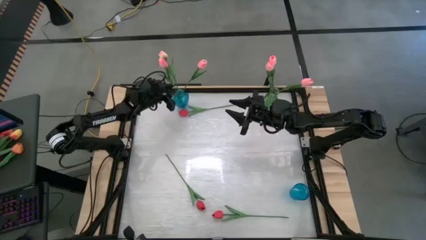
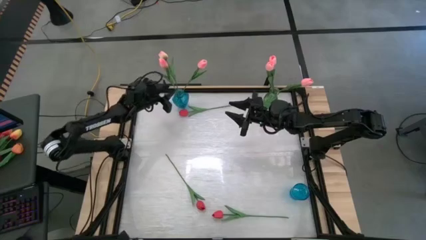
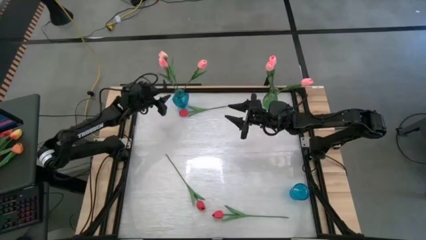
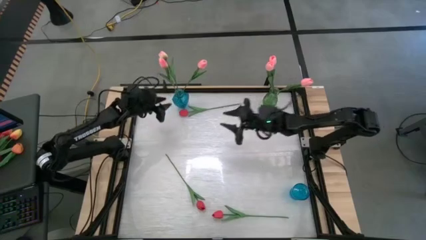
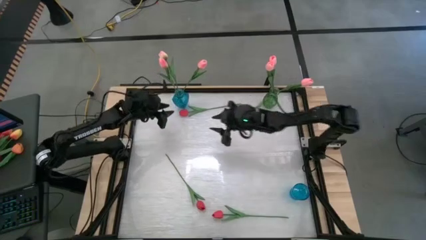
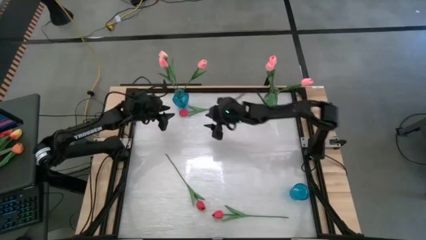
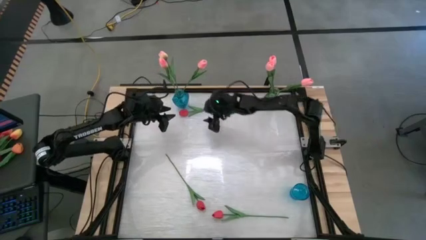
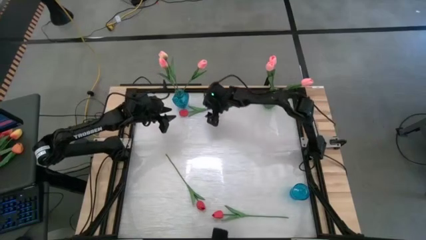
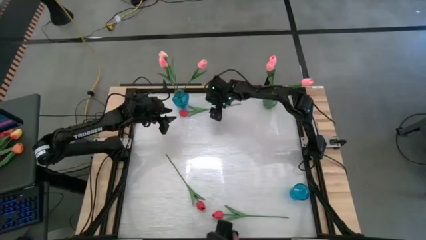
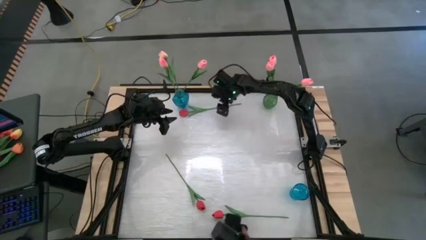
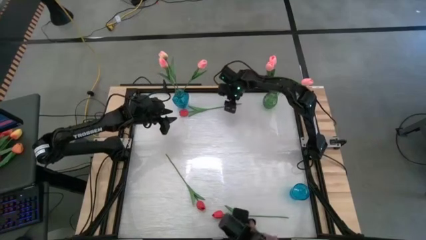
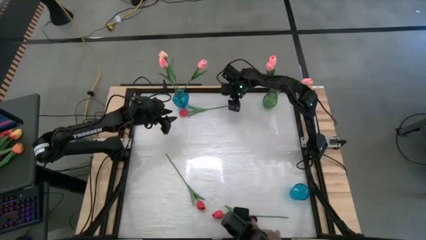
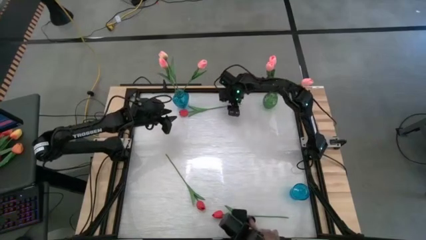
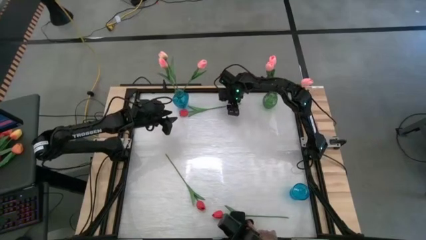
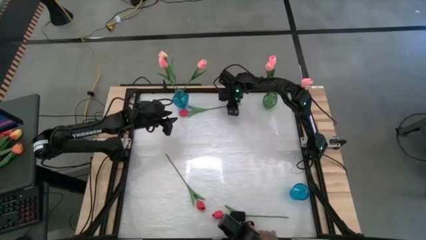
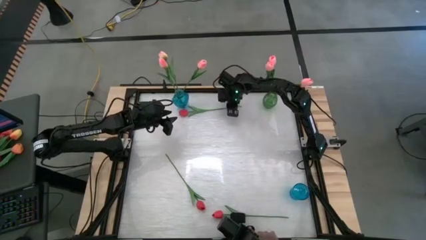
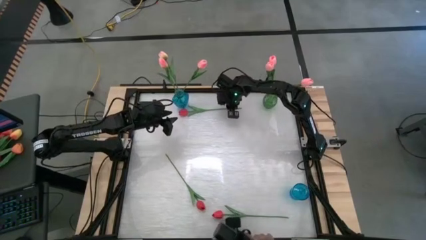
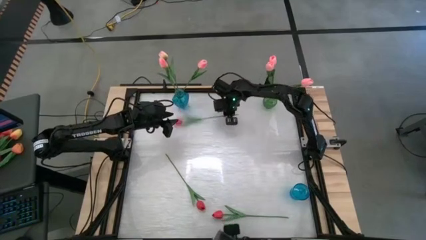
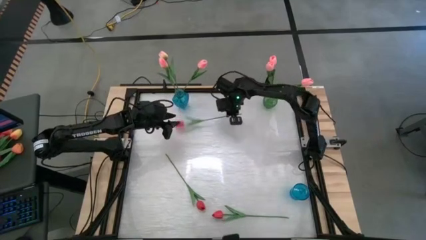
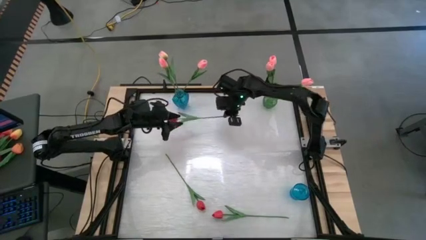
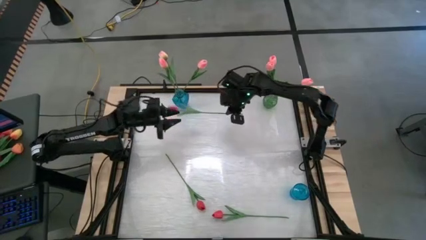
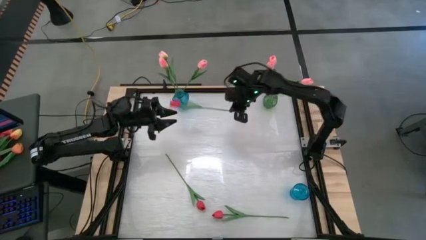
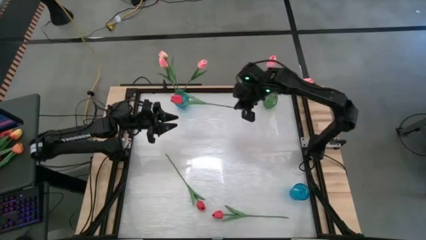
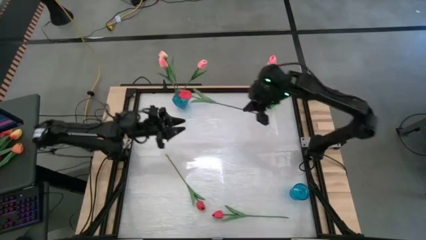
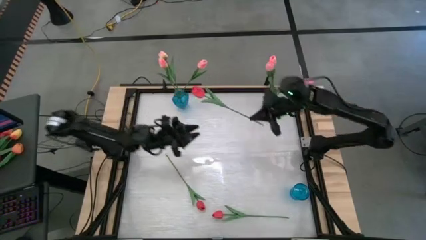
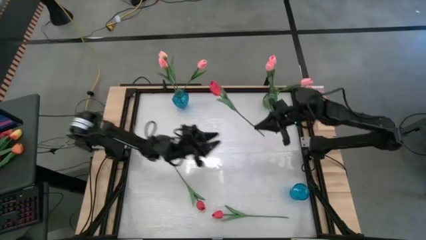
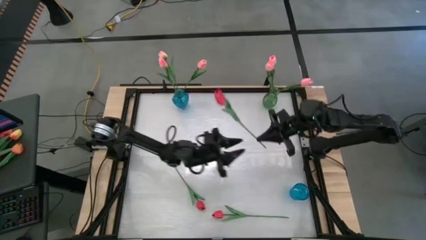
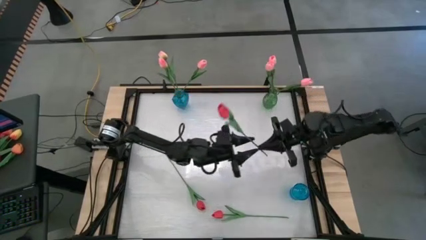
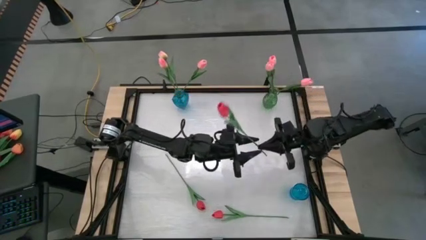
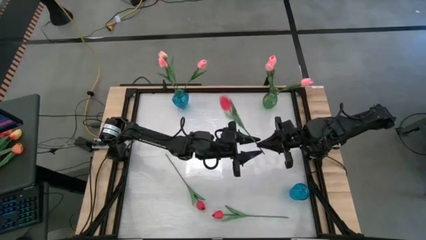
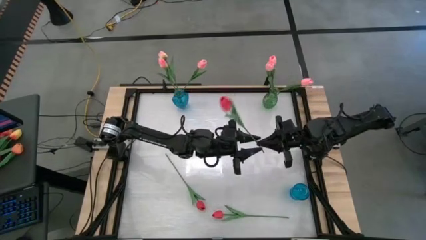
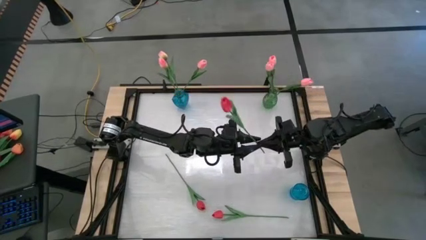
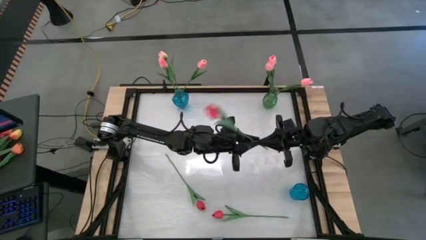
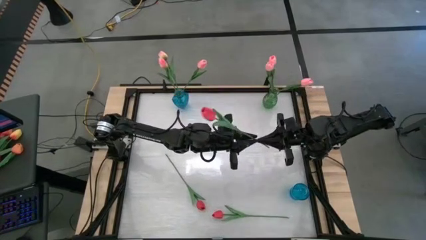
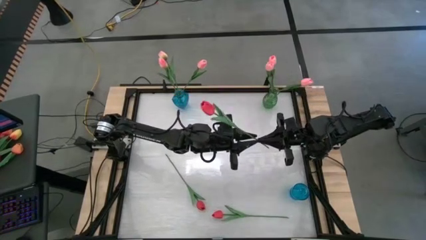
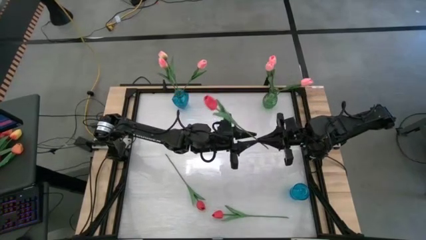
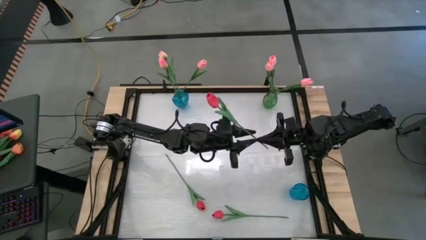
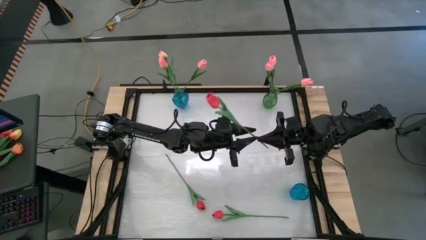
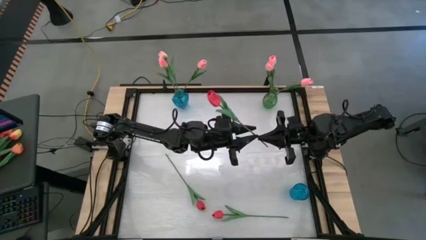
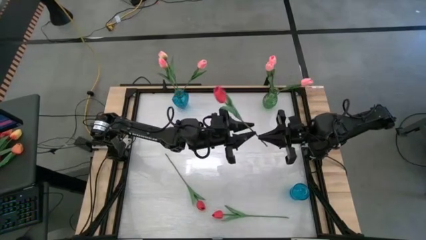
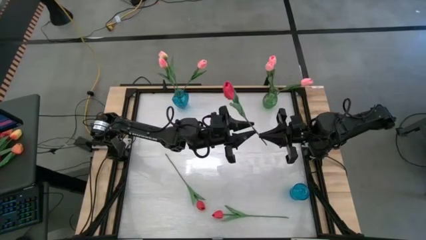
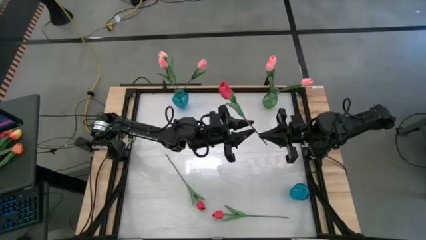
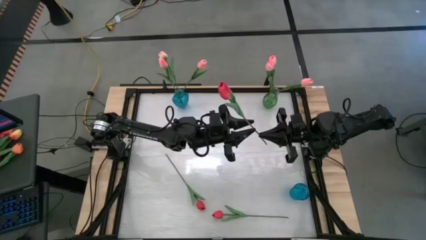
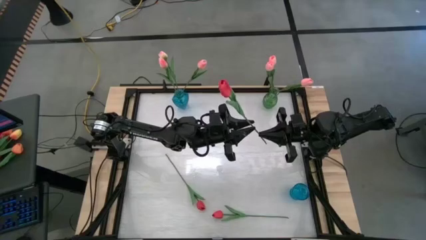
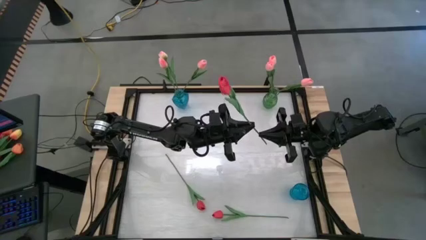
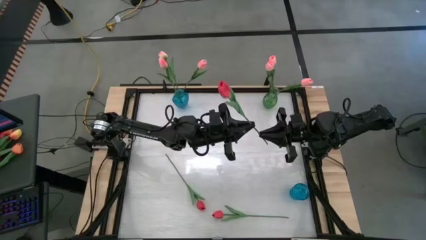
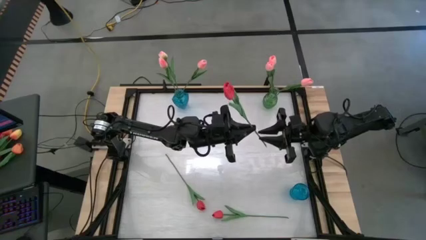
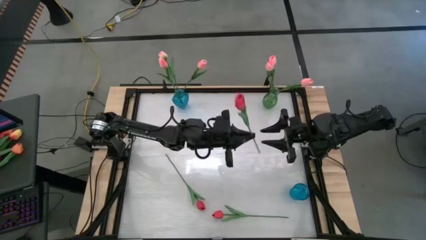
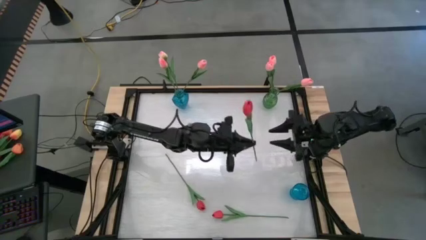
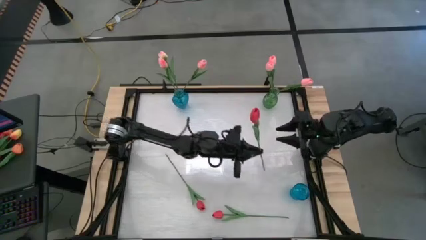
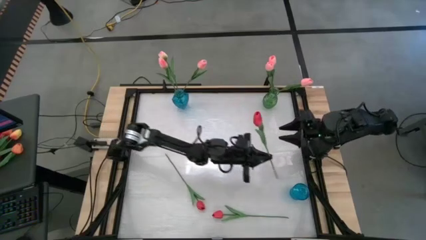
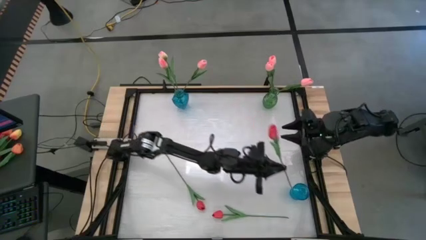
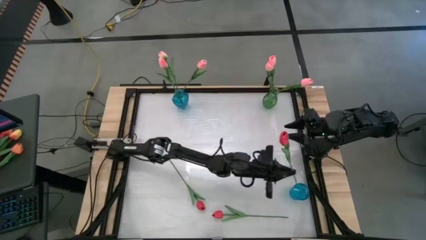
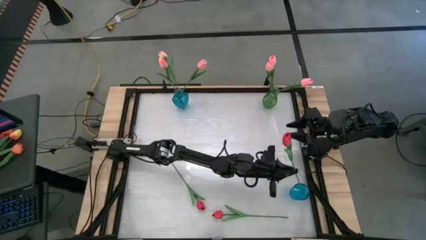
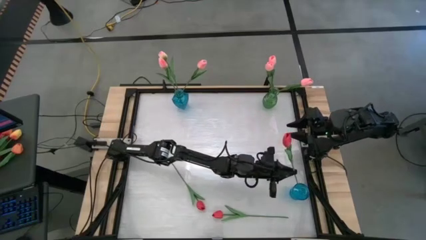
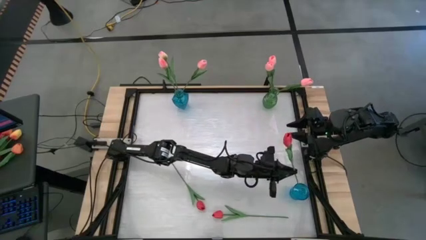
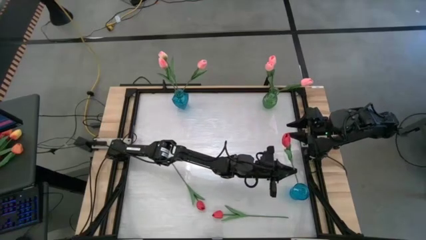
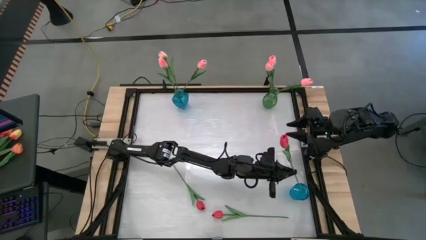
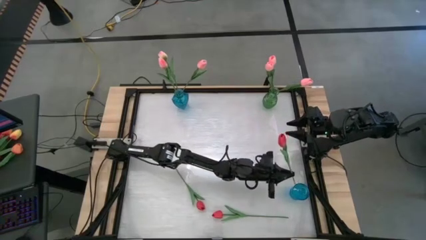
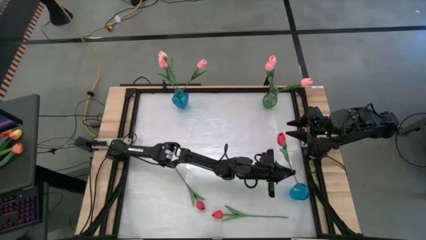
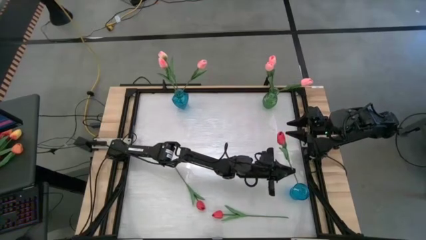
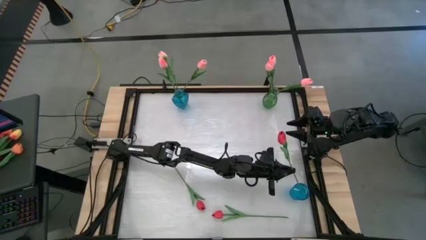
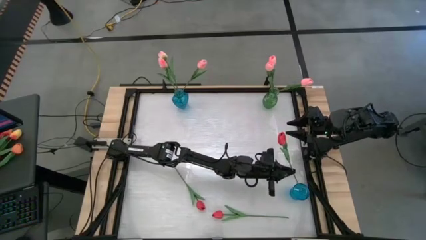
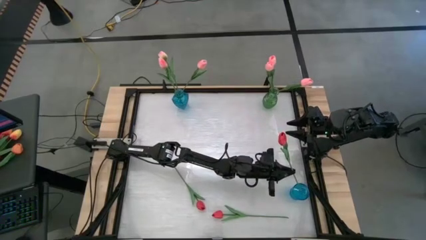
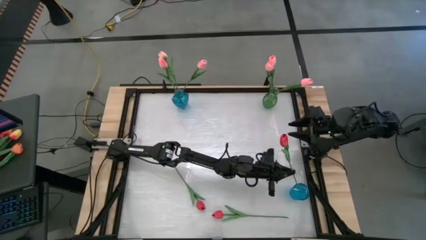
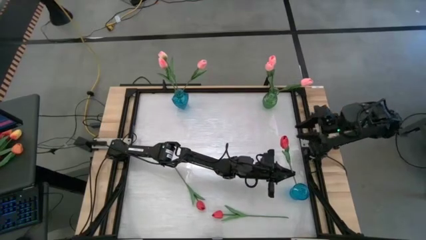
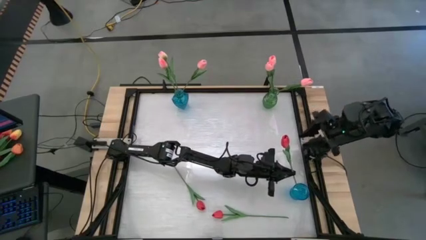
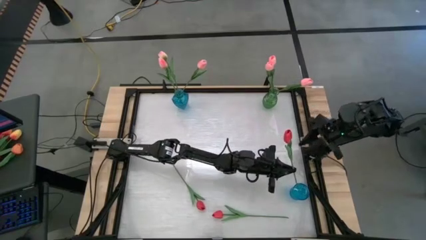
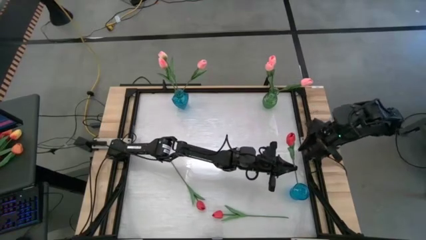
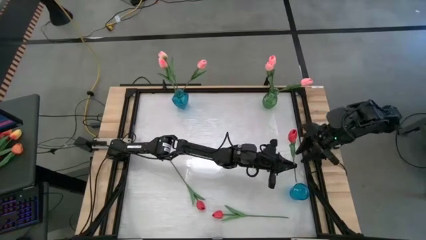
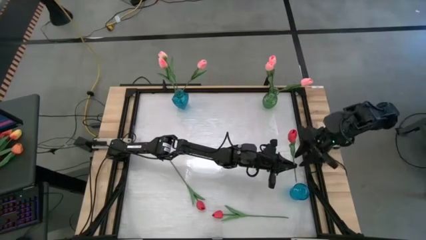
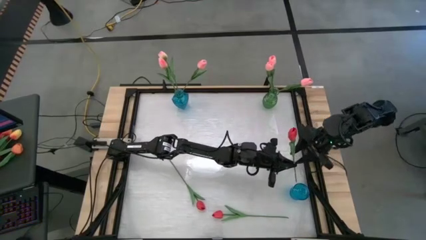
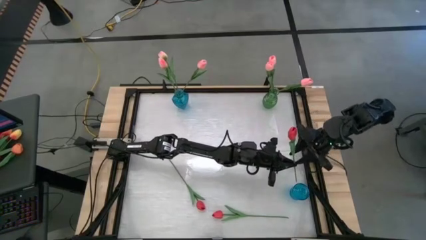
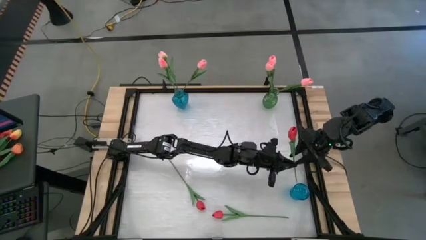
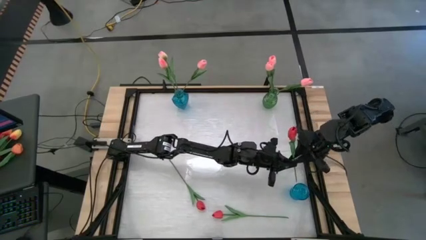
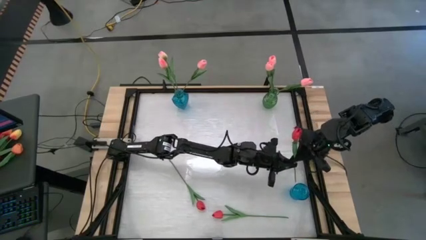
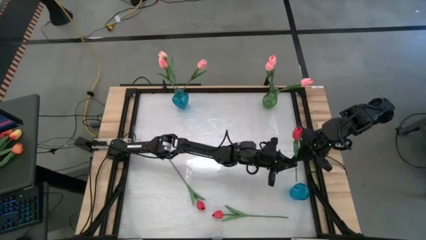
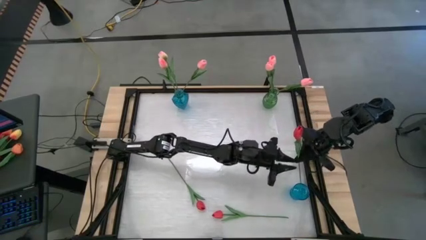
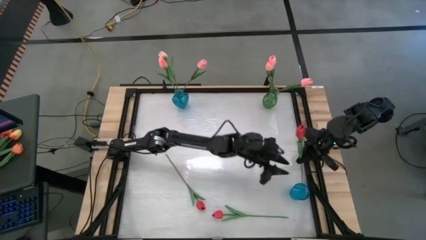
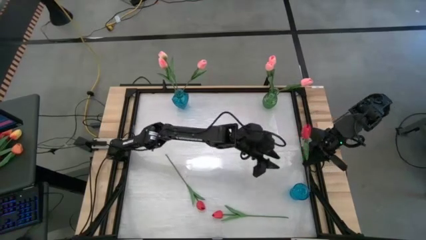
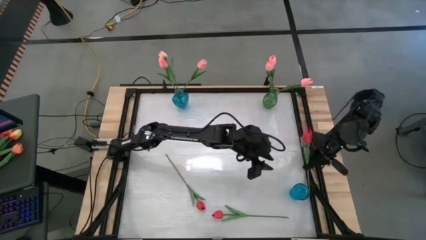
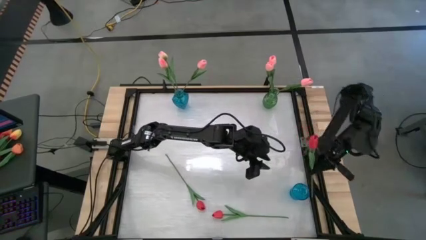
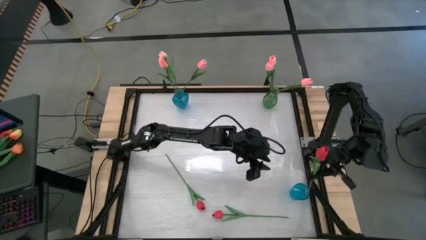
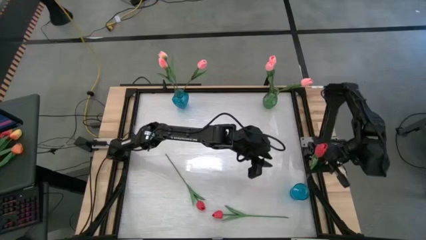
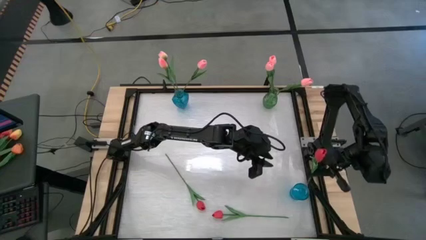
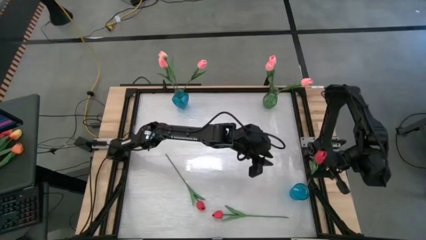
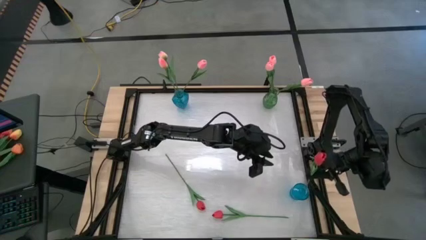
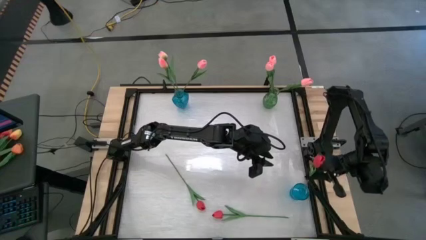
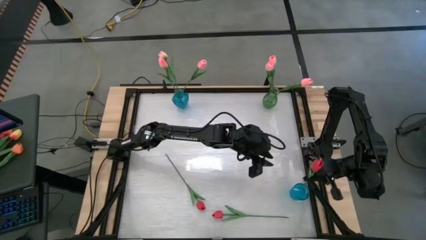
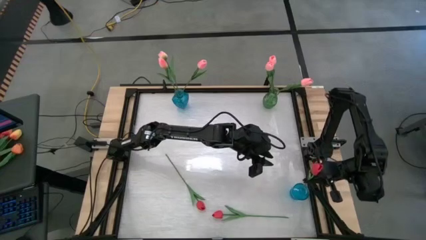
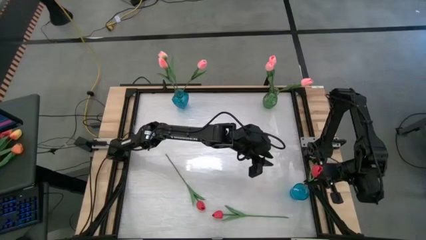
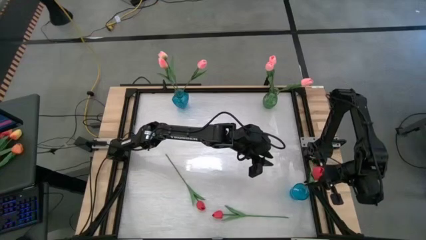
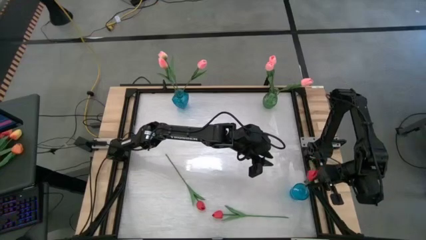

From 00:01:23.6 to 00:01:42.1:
Task: Sort flowers into vase by color
Put the top center red tulip into the bottom blue vase
